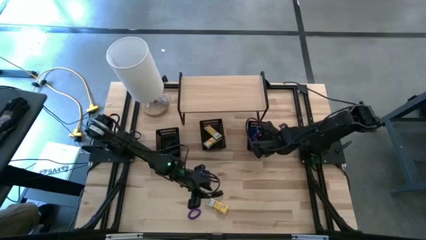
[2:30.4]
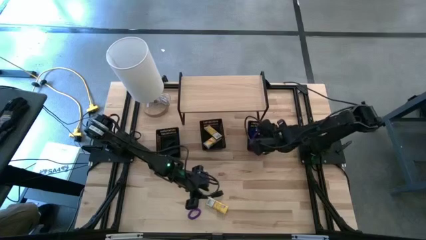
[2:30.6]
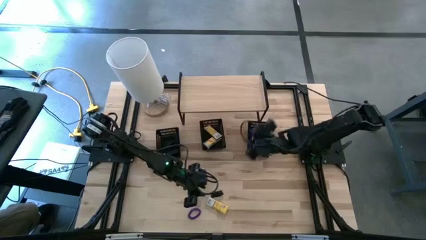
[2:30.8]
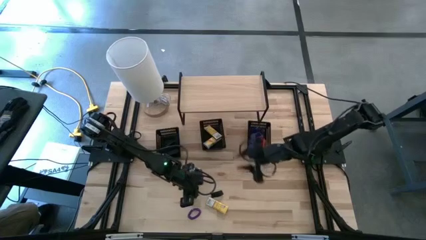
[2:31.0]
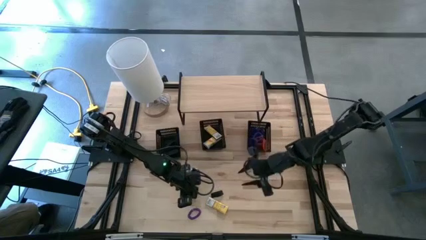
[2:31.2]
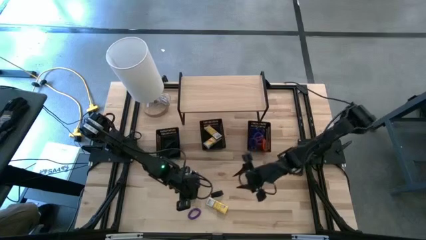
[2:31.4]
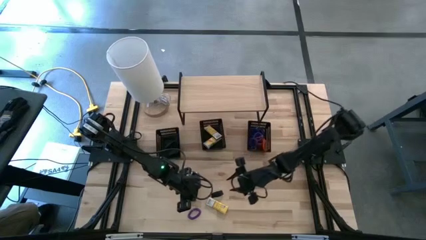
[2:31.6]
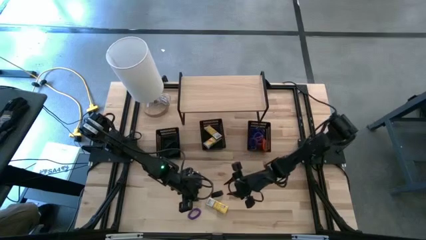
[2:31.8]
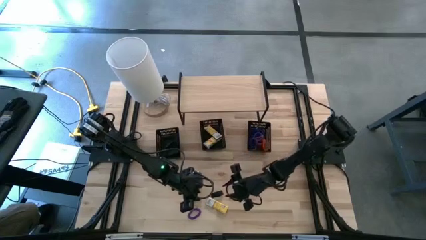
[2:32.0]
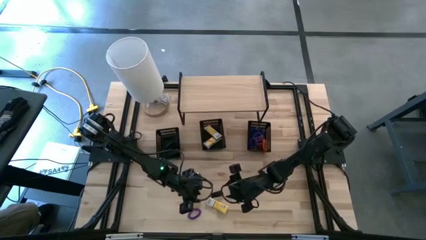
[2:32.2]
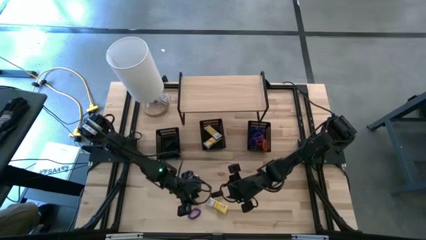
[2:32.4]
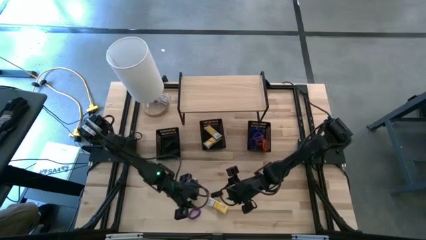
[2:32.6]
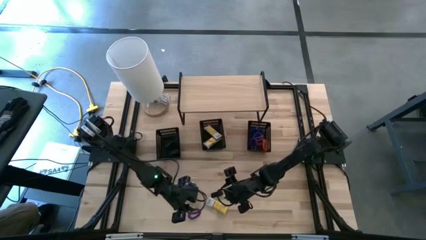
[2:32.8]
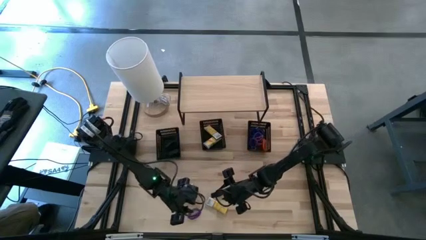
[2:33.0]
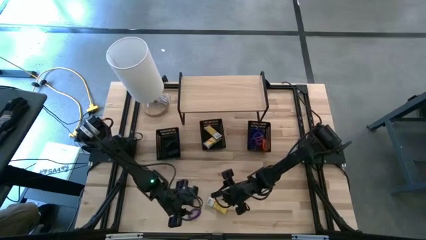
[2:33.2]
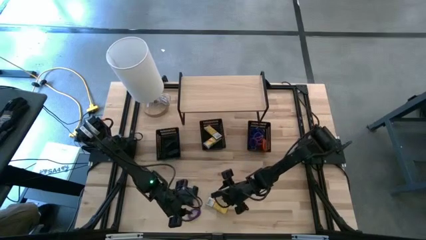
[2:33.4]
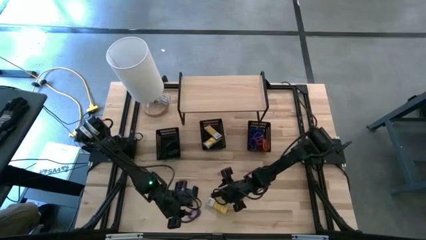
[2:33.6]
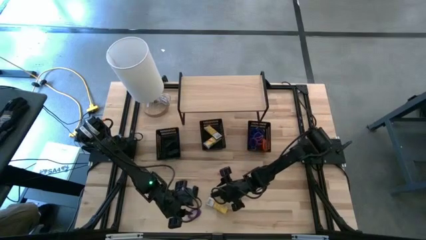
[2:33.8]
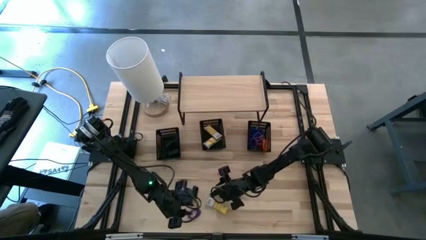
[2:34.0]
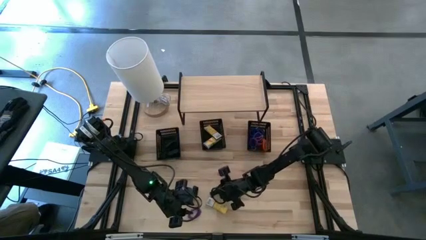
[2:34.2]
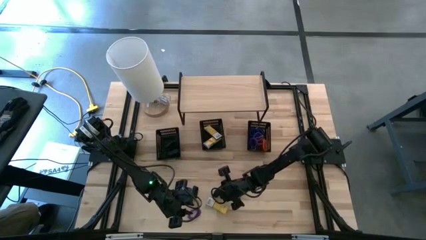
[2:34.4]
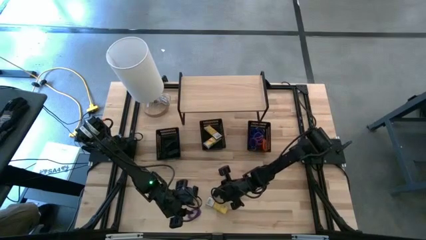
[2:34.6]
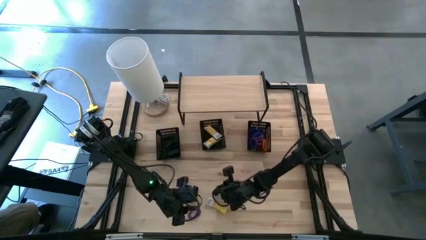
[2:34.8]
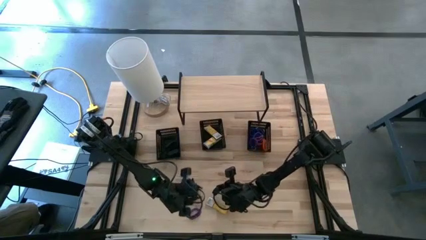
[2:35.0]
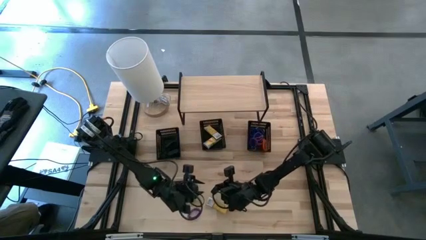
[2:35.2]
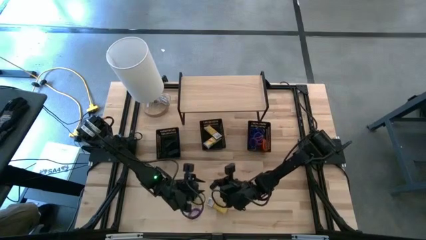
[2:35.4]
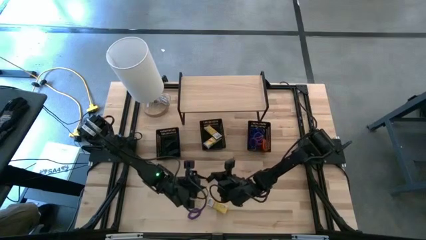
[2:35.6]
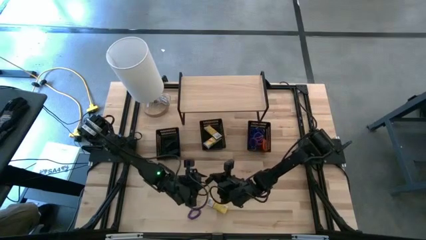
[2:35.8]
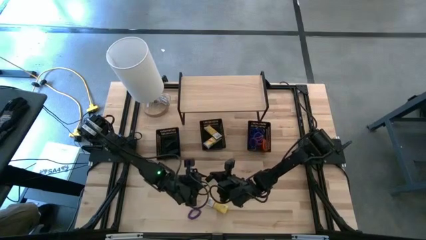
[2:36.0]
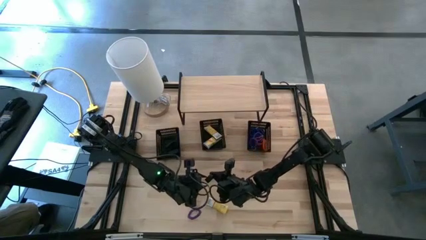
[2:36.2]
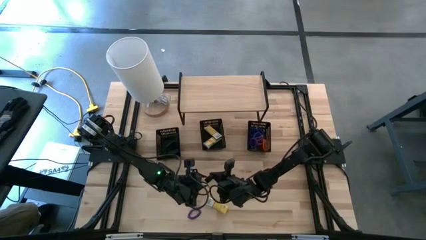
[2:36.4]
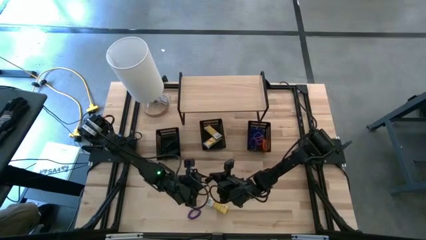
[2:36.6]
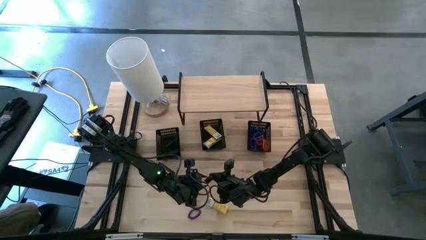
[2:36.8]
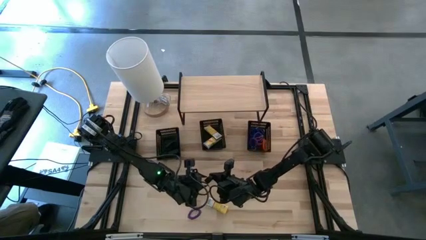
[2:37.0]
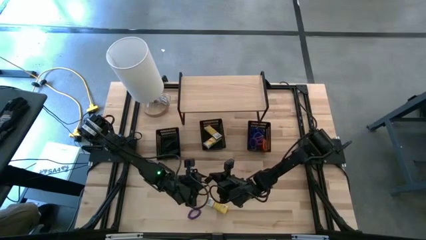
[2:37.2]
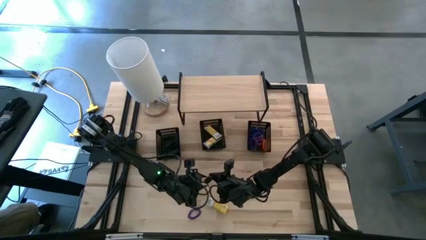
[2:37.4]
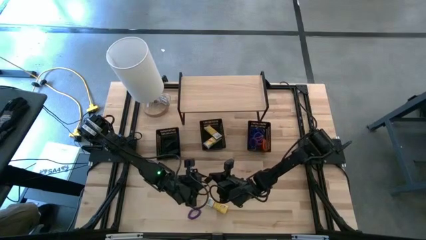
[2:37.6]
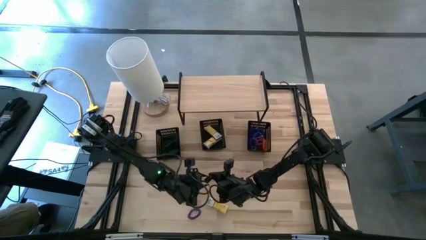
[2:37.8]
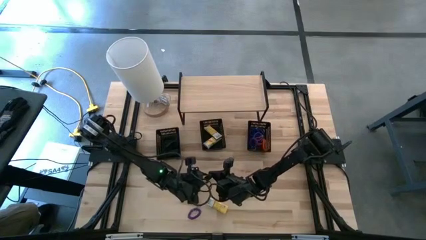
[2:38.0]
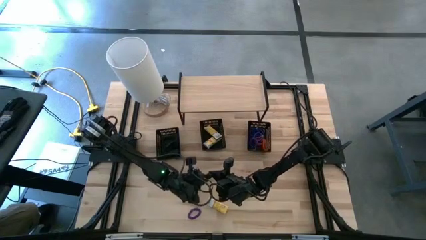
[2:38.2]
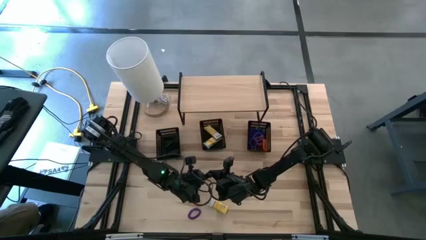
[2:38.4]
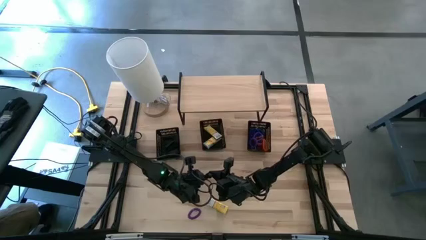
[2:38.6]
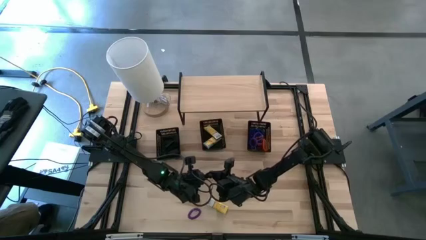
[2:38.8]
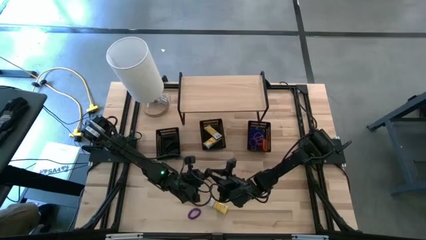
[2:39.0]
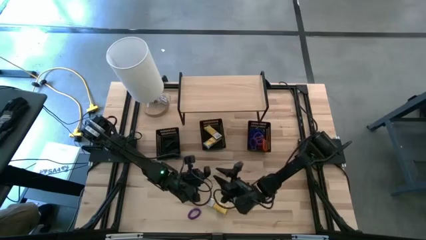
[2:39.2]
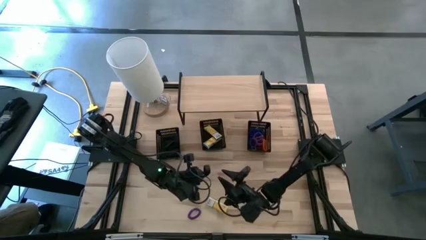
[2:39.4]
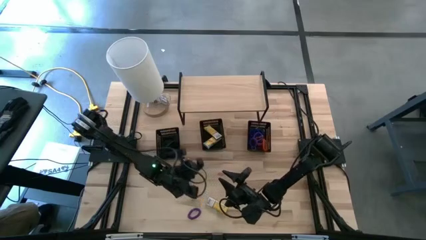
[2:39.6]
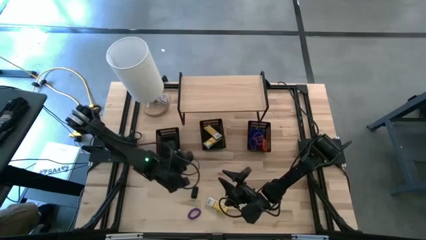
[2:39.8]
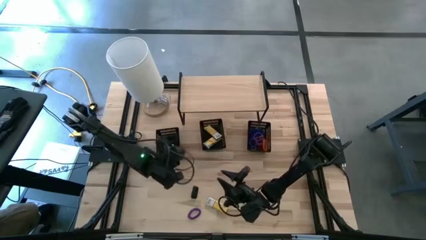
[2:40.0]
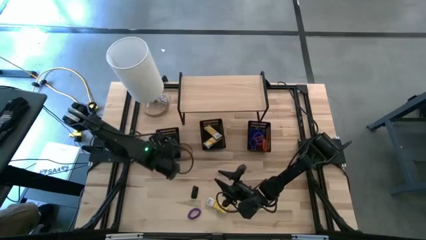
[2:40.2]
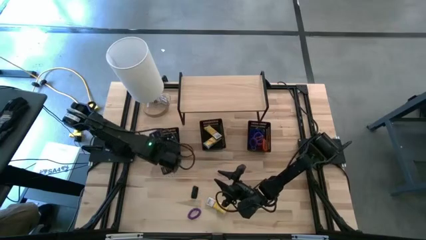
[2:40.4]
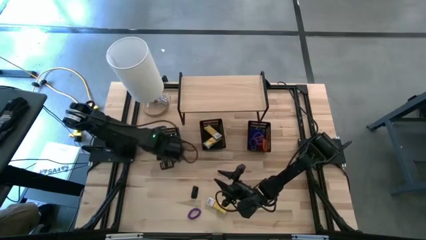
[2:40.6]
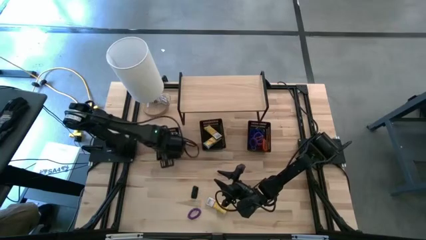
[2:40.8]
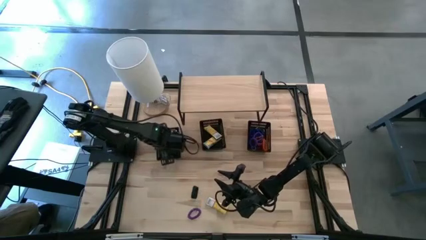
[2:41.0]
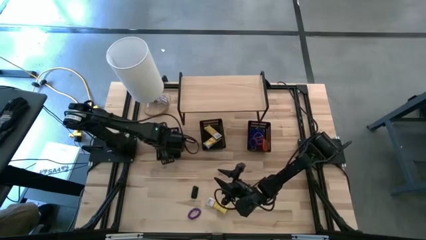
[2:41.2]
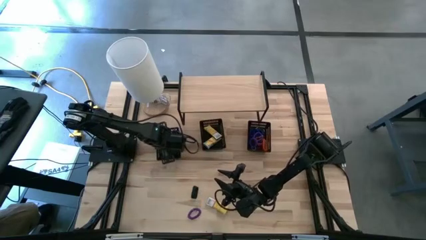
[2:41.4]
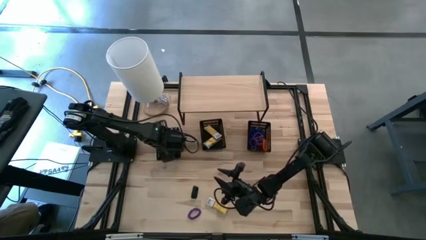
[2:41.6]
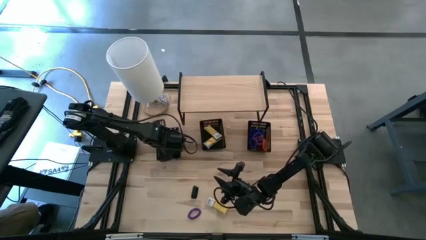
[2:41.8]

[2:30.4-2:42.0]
Task: Pick & Place Office Desk Supplies
Put the black rubber band into the left black bin

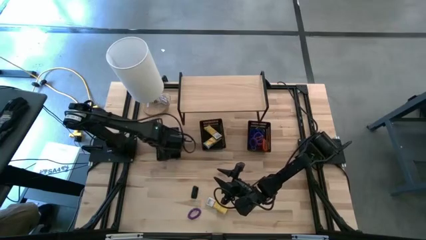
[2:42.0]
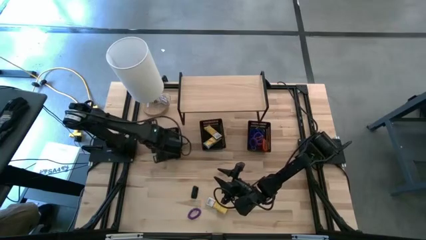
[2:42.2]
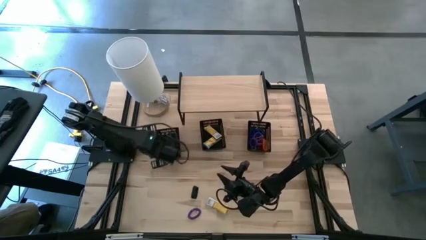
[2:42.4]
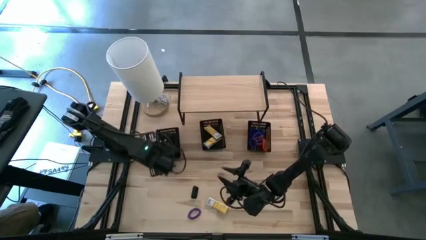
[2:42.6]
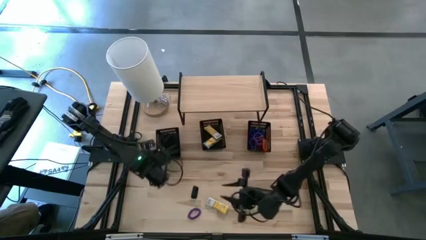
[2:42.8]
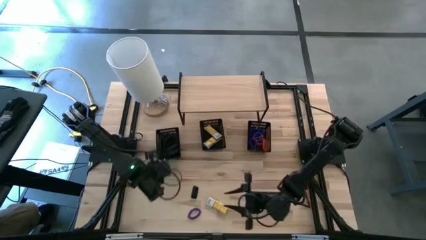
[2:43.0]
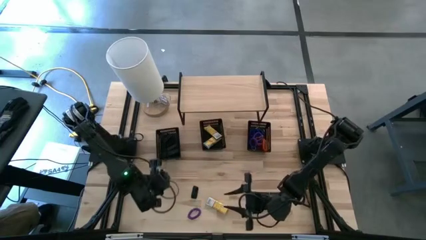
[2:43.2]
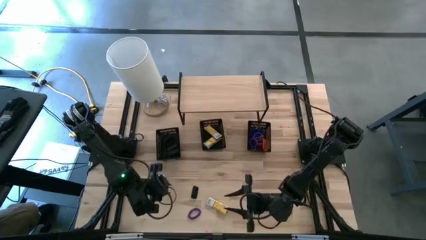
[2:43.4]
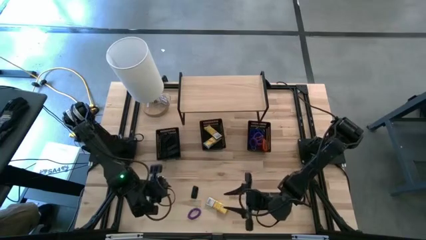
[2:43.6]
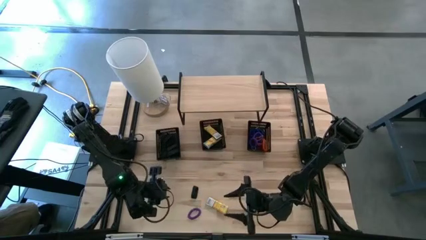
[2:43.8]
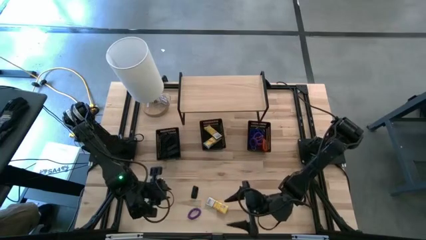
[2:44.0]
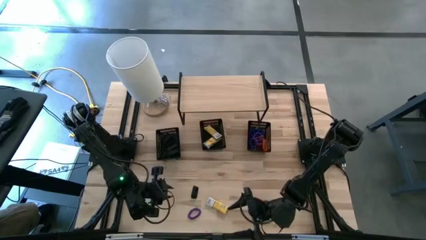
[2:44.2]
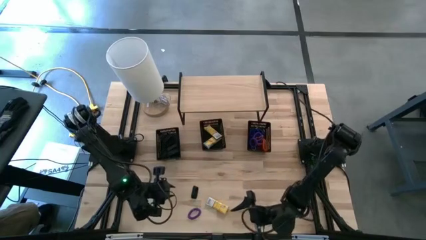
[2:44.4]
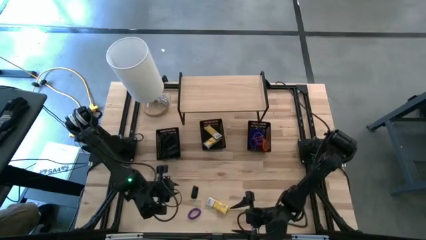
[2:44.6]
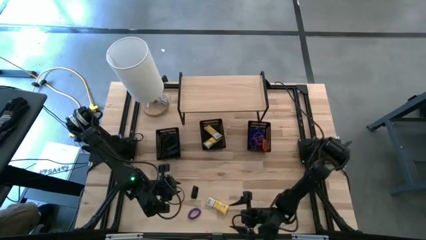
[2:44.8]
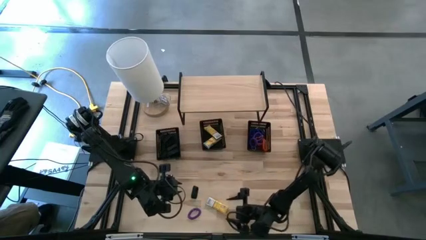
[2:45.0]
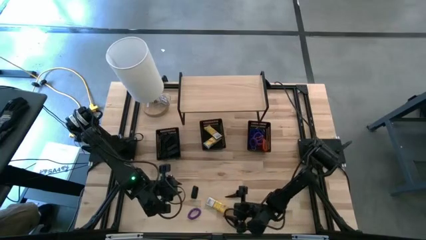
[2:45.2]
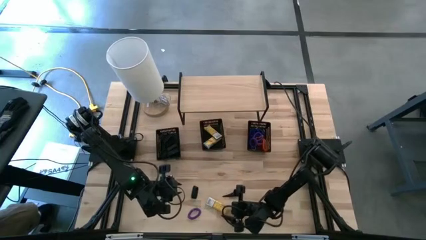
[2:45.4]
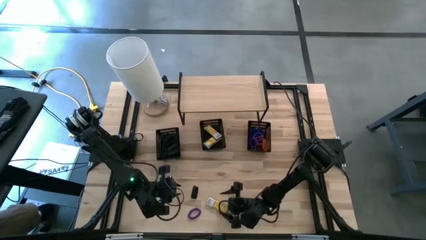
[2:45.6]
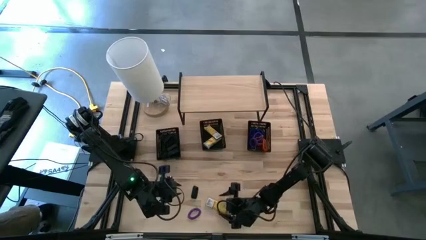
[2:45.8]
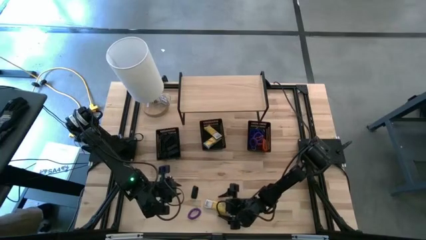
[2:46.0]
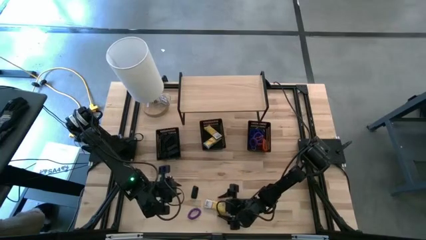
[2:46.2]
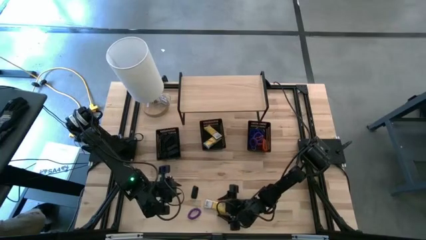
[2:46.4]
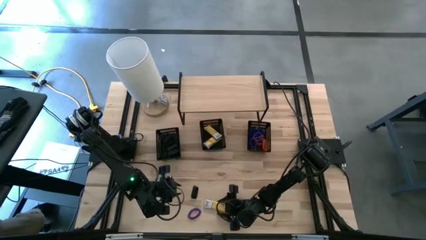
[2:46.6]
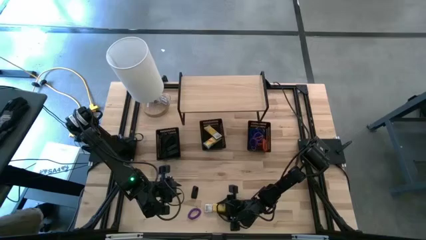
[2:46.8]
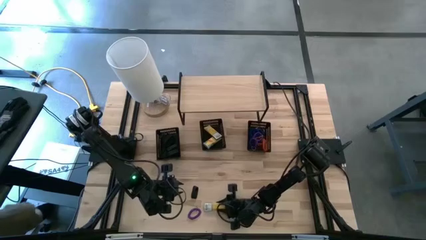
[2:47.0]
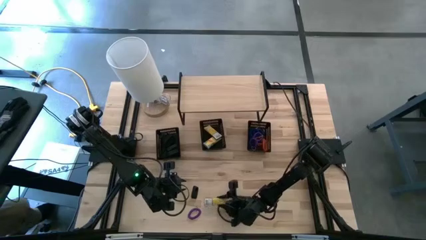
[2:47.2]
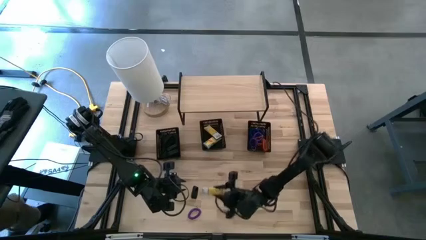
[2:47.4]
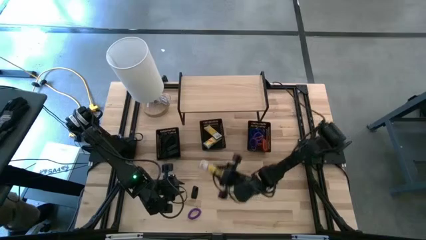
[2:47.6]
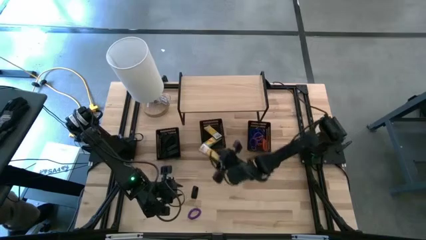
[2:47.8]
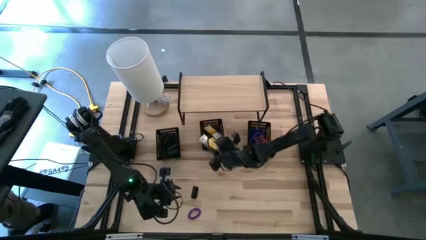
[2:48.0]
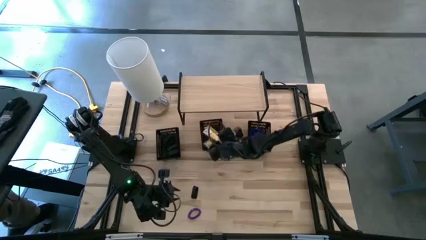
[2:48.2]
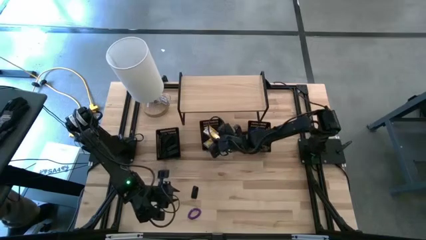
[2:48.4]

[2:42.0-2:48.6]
Put the yellow crayon box into the center black bin
